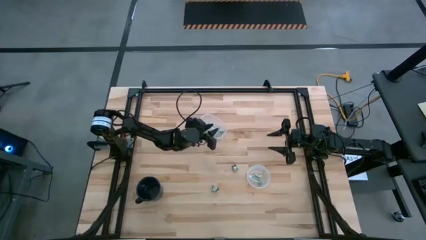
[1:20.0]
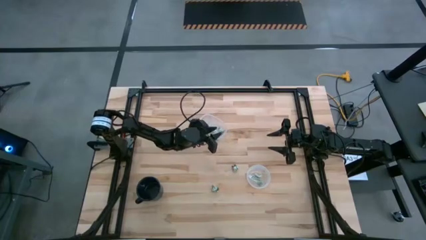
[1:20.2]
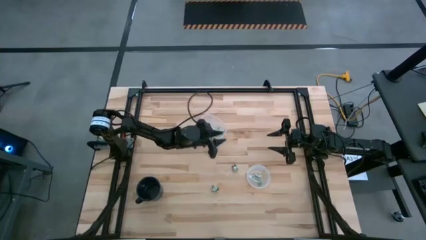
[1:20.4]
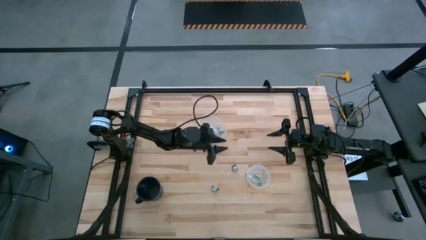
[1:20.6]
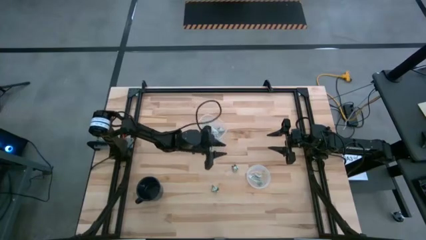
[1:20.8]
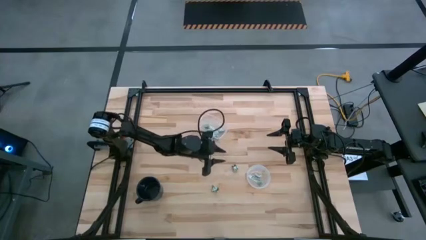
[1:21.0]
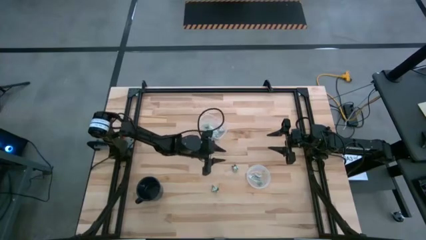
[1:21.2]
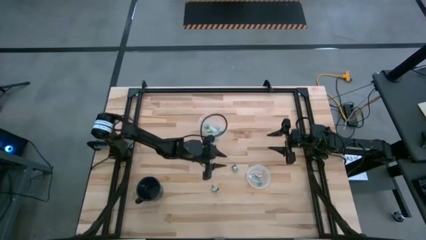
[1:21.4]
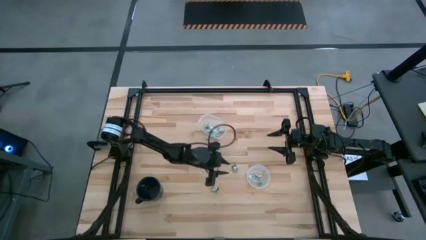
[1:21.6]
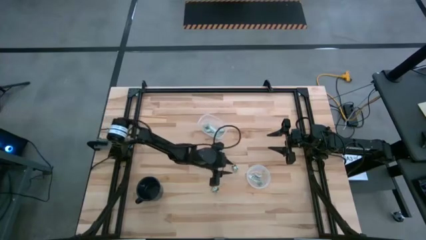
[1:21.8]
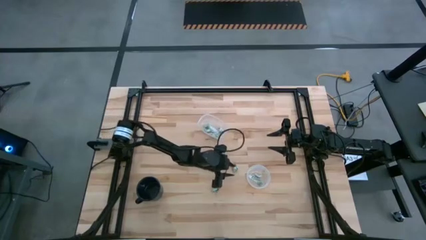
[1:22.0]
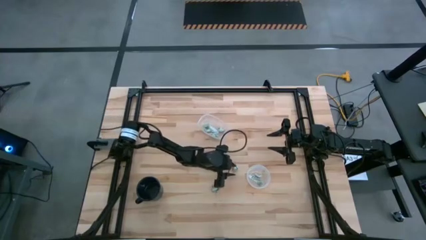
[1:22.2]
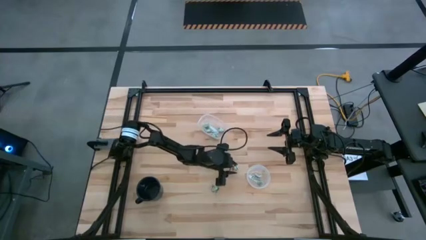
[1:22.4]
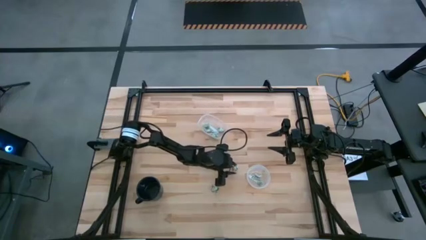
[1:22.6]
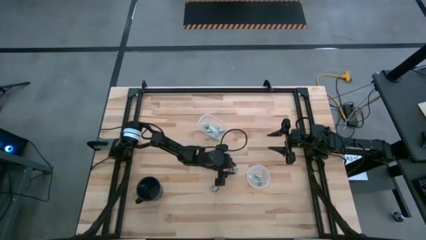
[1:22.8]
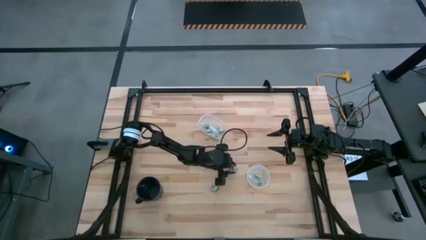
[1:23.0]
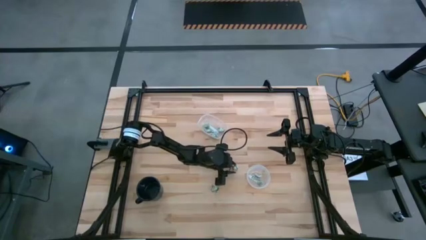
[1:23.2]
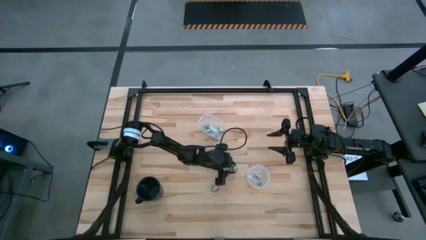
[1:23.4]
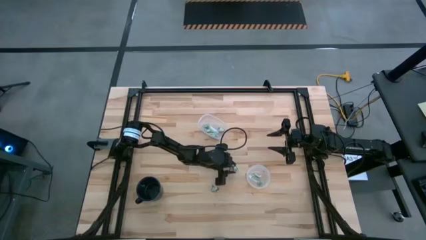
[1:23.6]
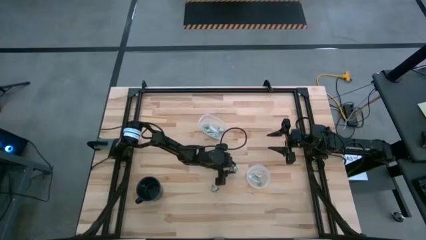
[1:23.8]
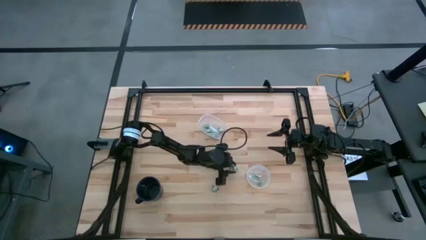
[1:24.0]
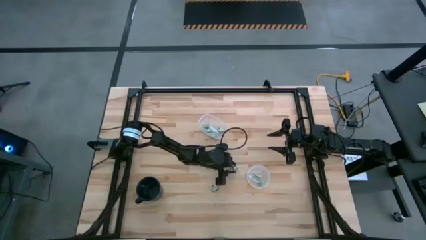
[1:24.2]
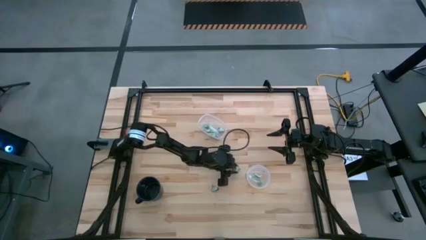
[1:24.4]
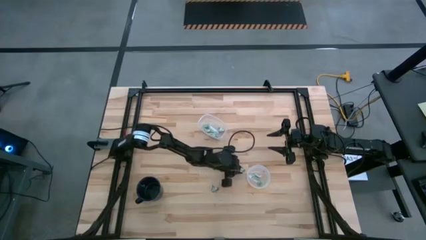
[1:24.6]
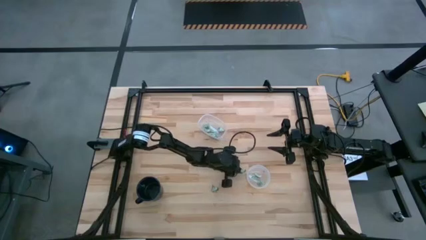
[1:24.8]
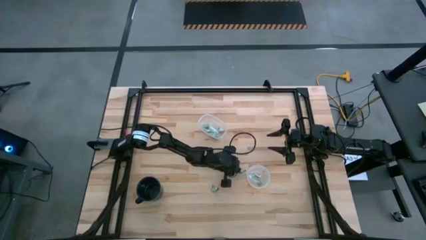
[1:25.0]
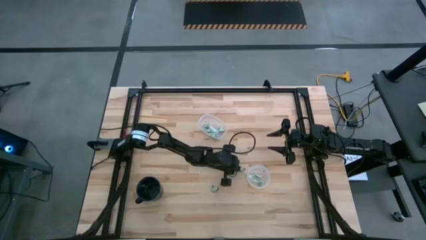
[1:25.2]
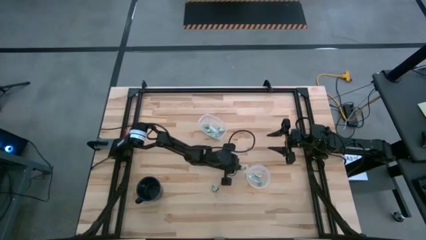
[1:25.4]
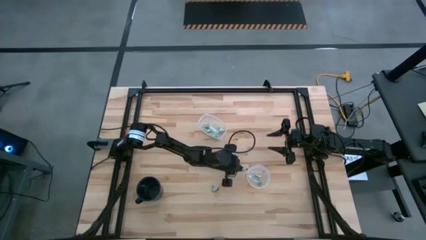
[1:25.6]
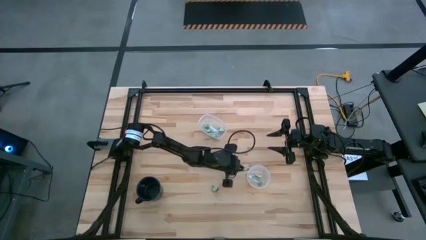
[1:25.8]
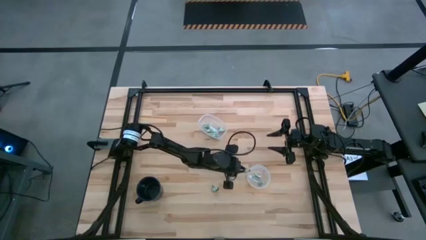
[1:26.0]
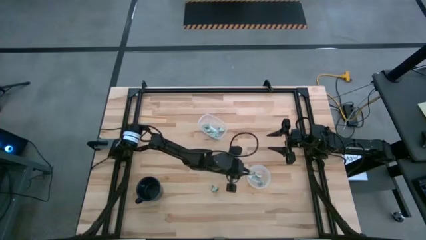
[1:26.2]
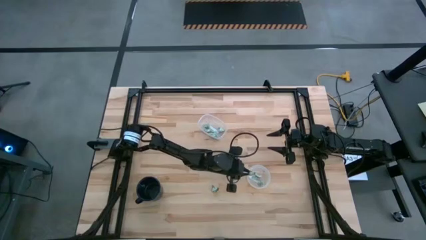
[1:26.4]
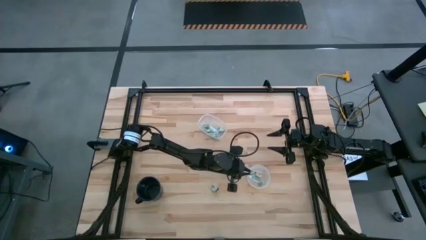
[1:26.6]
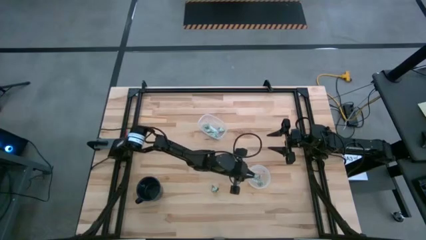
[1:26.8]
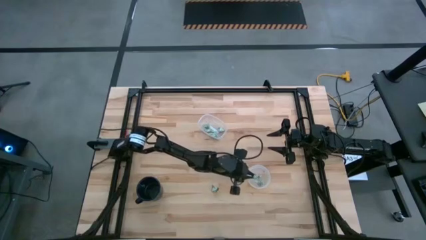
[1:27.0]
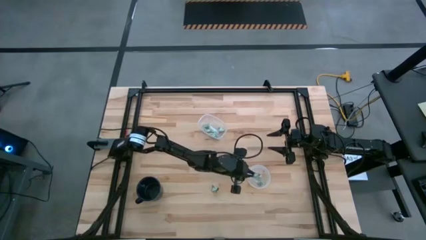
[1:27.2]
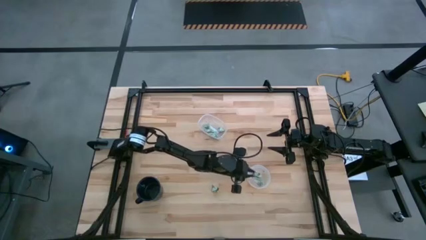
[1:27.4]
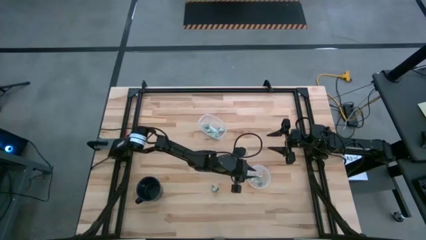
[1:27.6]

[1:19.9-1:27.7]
Task: Pick and place Stevia / Truvia into bins
Put the truvia packet into the round transparent container

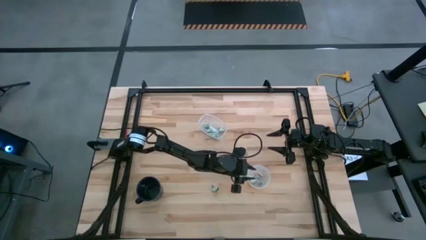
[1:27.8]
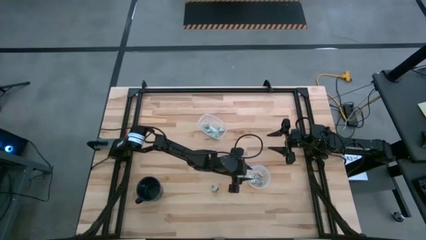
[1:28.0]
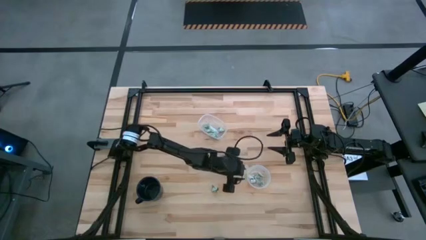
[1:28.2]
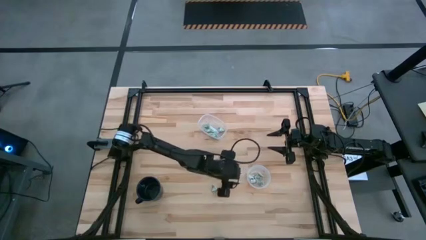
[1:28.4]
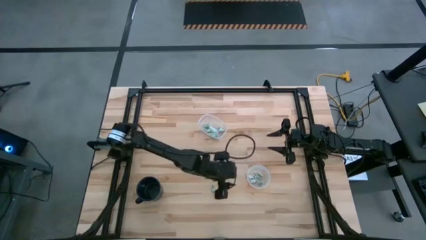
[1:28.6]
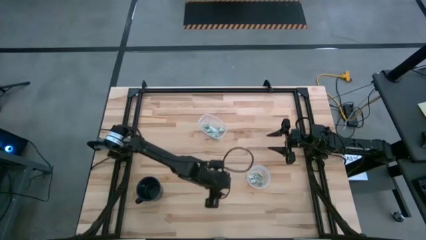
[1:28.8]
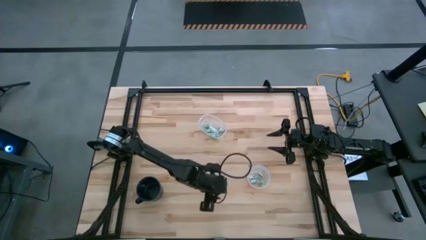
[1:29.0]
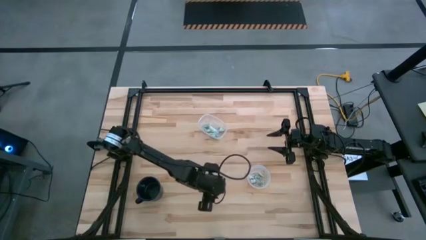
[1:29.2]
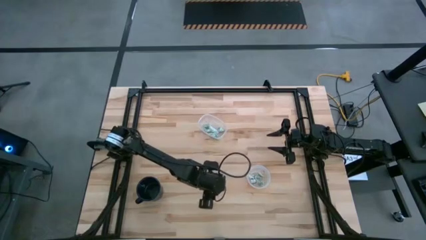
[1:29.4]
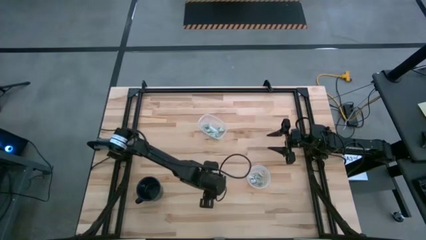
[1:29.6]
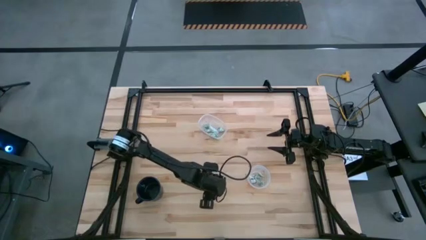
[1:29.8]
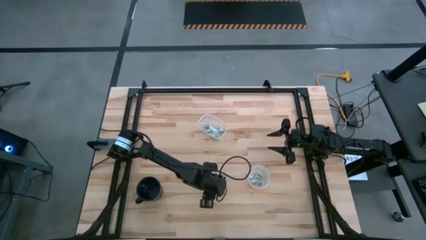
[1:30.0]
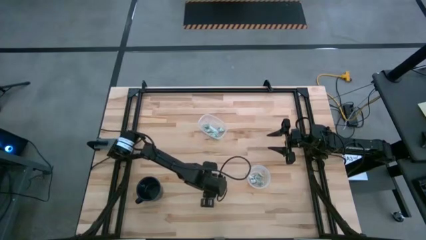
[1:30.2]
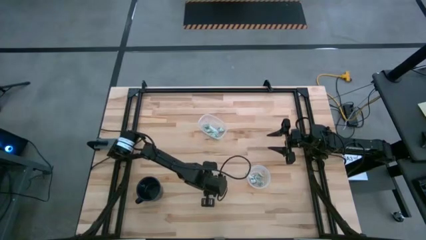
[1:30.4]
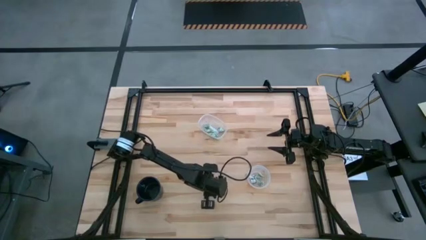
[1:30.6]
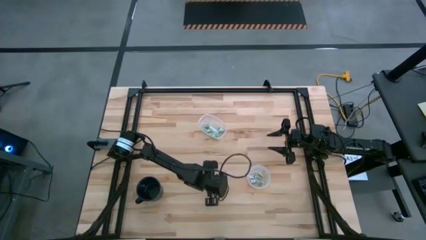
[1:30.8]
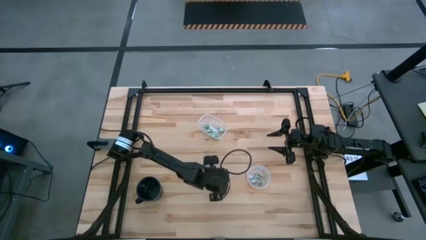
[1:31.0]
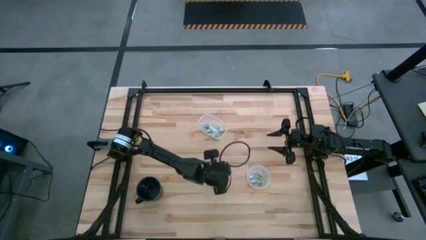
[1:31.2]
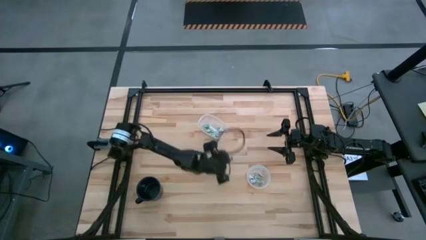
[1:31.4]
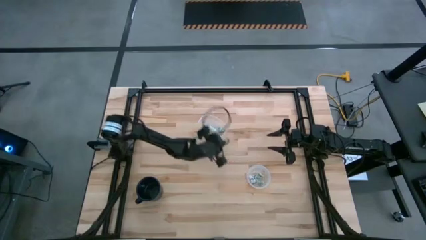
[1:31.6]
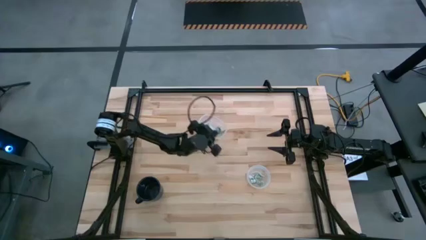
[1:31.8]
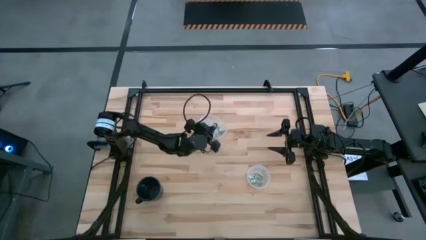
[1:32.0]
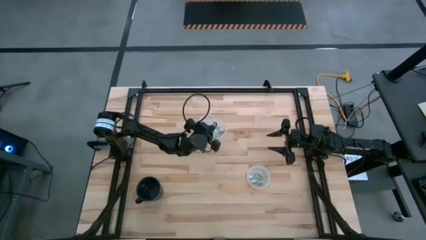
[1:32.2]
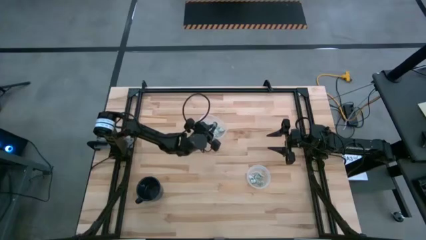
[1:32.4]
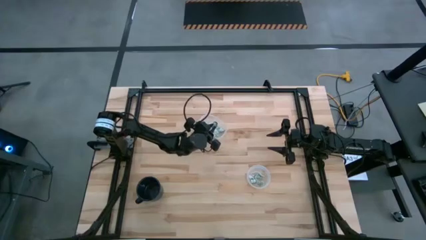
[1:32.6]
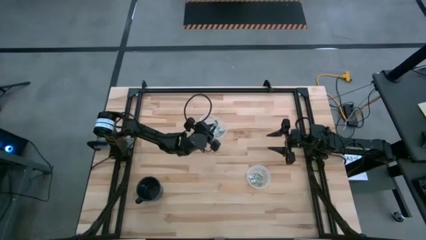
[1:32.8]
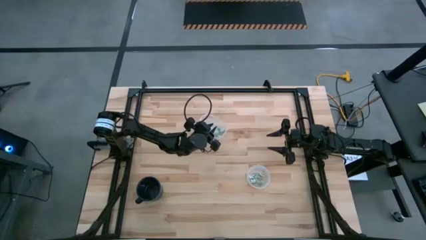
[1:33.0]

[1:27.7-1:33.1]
Put the truvia packet into the round transparent container
